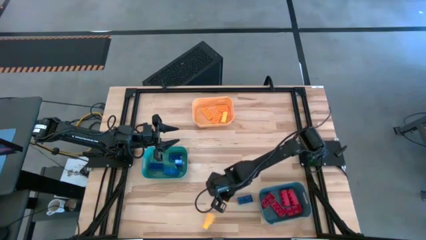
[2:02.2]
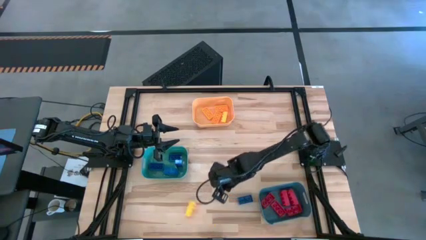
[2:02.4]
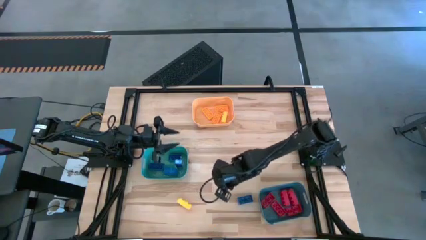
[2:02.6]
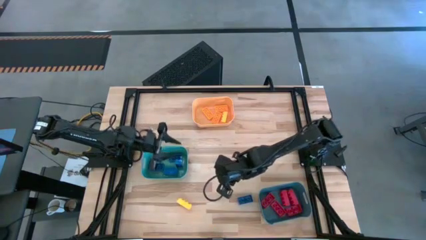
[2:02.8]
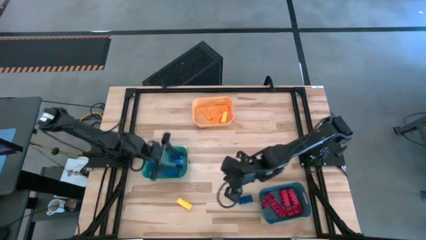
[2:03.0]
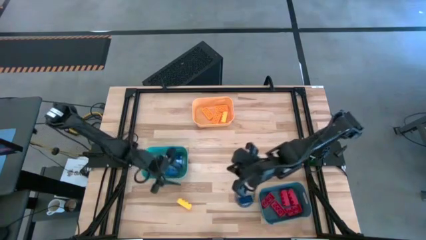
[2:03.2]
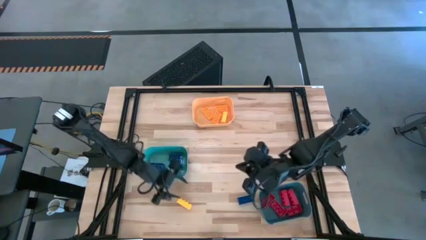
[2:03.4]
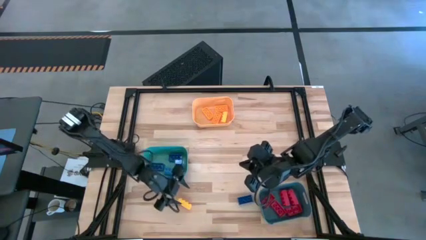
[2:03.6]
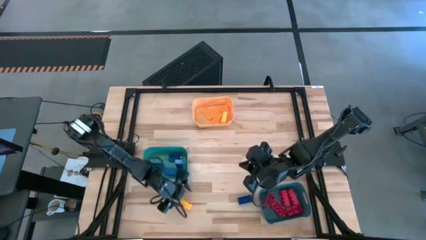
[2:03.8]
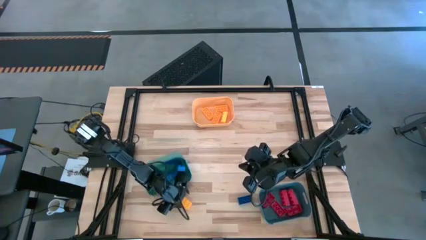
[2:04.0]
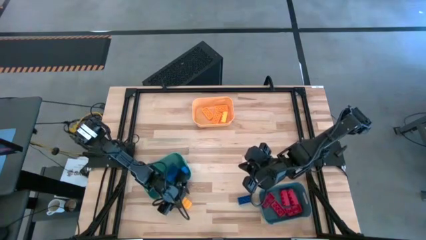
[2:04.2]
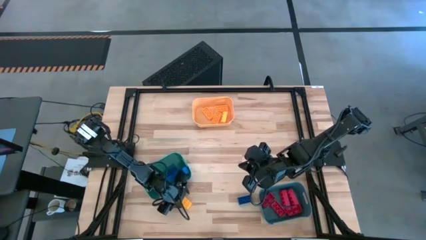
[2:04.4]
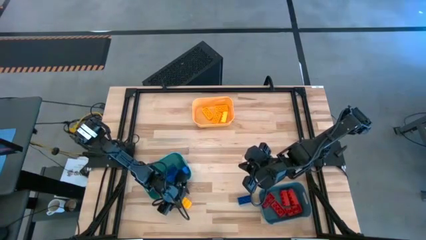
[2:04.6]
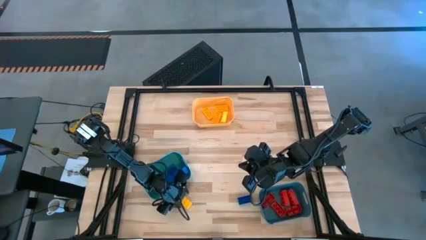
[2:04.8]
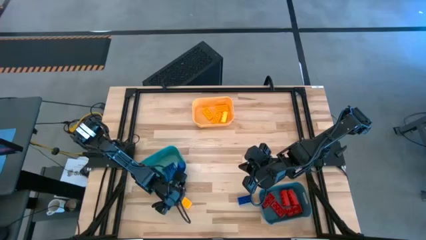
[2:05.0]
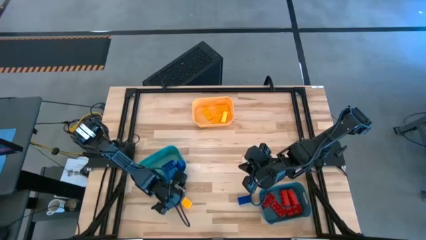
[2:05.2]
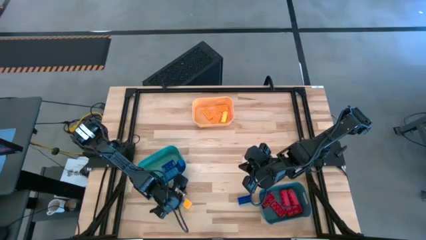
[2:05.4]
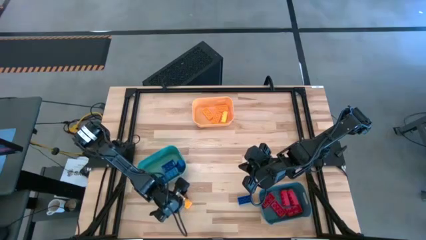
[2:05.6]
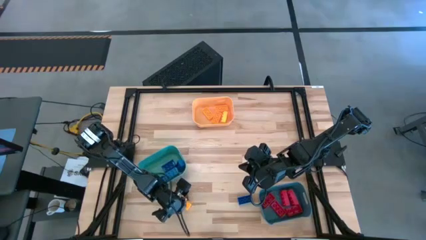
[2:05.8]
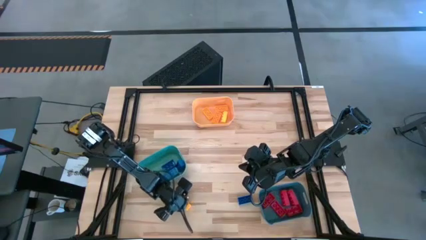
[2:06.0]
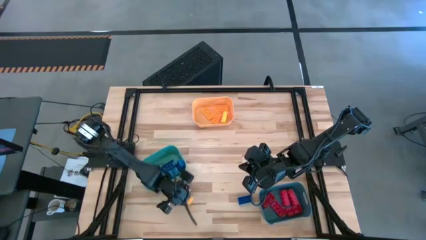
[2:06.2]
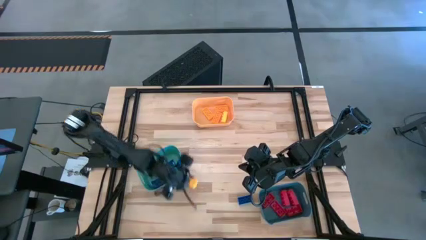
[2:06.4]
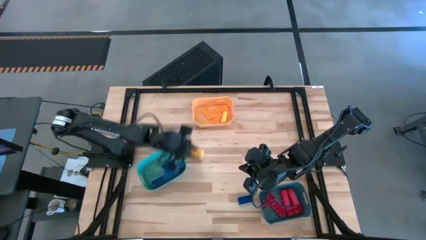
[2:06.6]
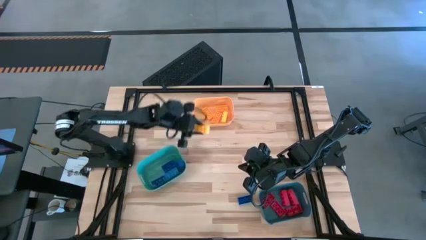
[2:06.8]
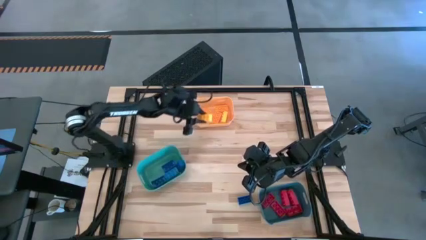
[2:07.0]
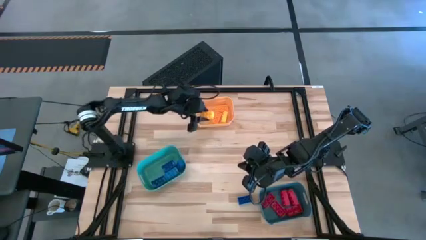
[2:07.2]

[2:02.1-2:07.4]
Task: Sort & place blocks by color
Put the yellow game piece into the orange bin

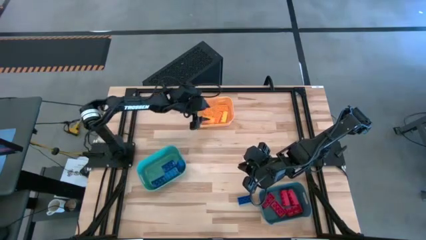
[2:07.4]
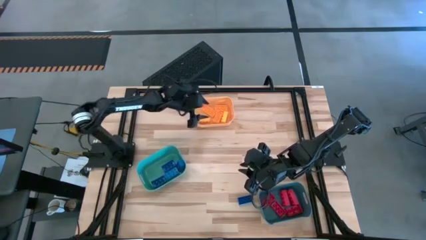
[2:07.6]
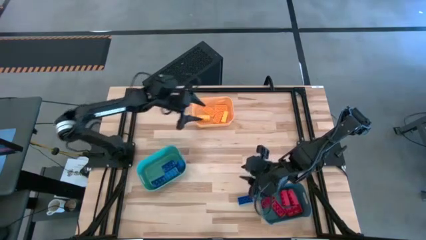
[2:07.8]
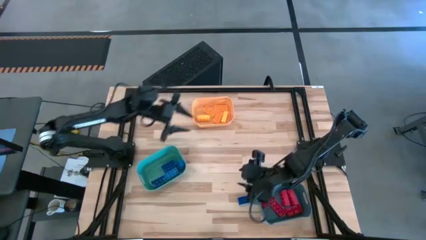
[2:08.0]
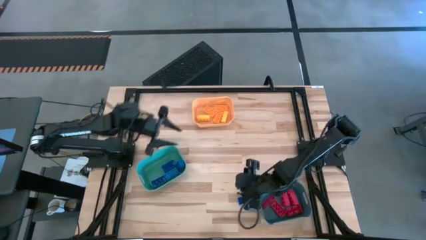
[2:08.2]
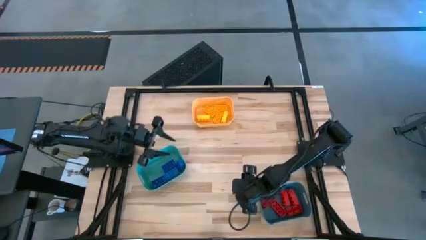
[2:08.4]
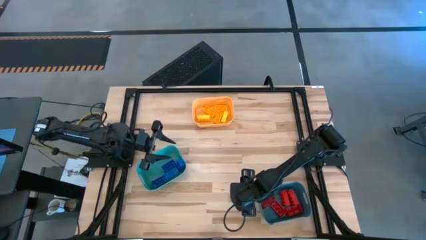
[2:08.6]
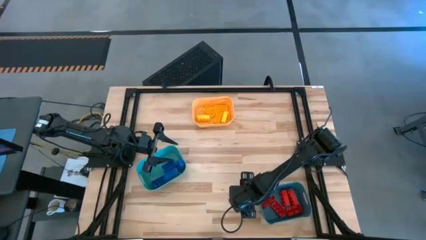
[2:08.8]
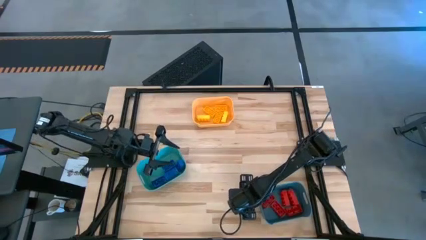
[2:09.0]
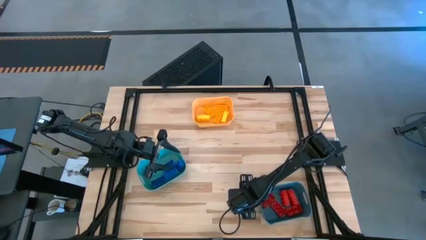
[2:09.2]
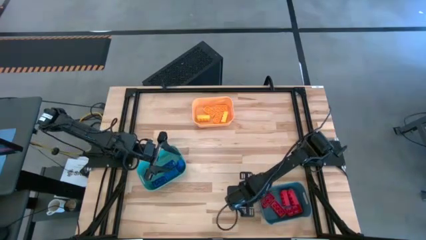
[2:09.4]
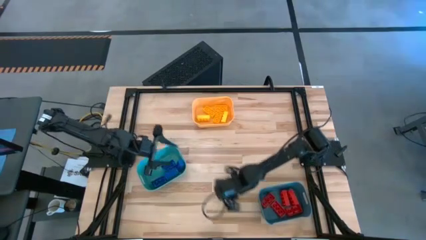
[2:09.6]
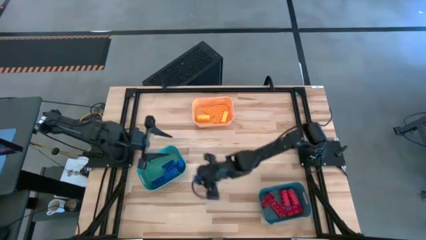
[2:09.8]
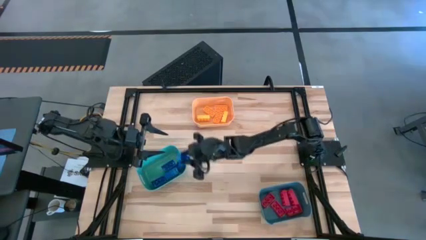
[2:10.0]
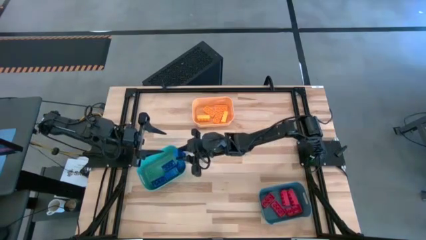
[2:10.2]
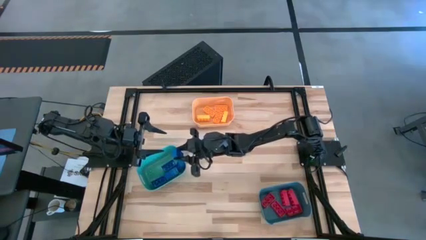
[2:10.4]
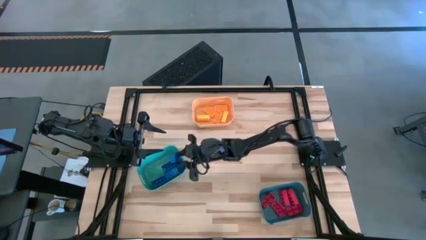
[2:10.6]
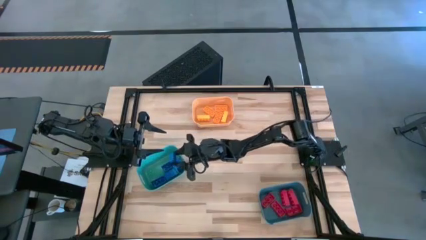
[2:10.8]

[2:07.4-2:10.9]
Put the blue game piece into the green bin

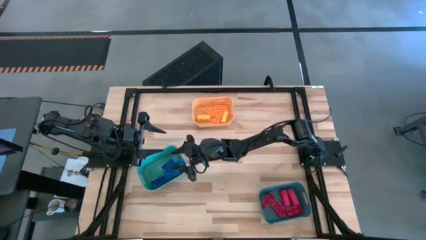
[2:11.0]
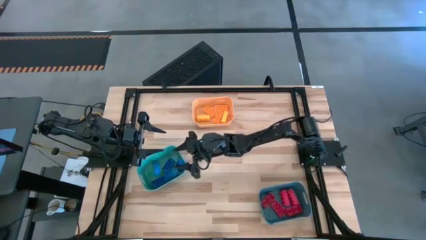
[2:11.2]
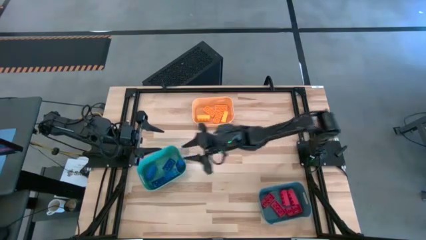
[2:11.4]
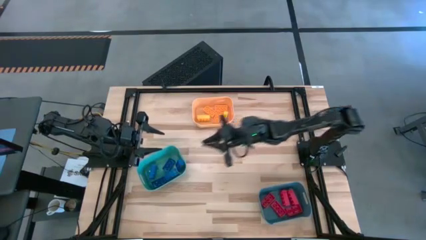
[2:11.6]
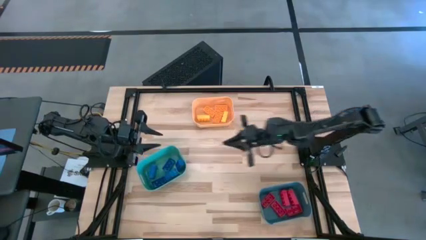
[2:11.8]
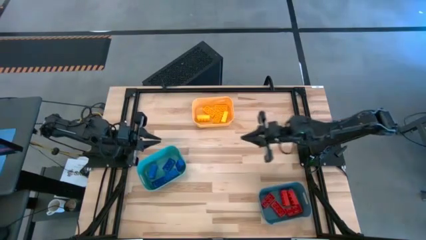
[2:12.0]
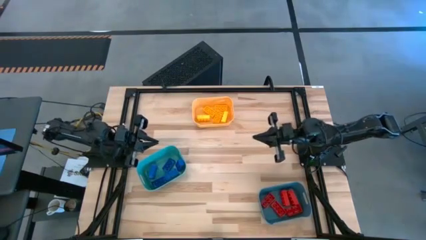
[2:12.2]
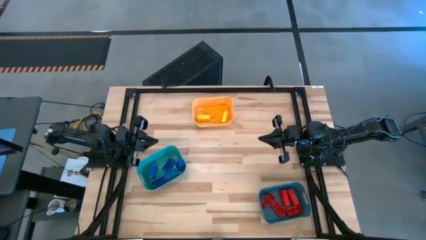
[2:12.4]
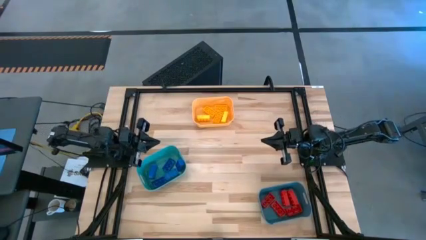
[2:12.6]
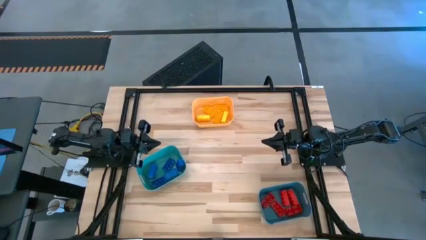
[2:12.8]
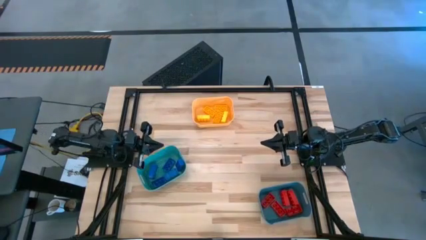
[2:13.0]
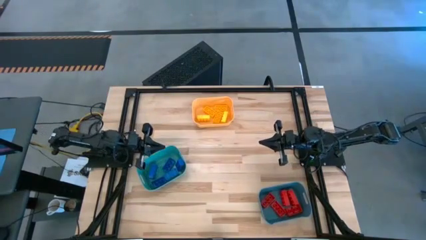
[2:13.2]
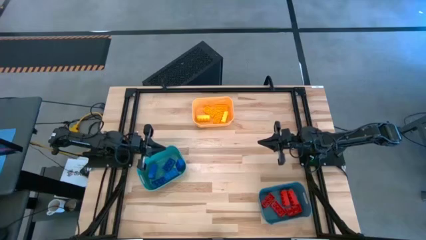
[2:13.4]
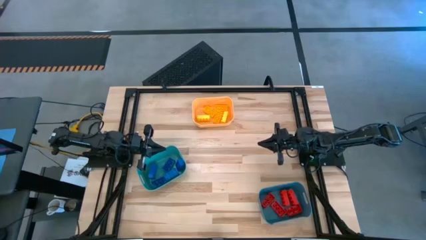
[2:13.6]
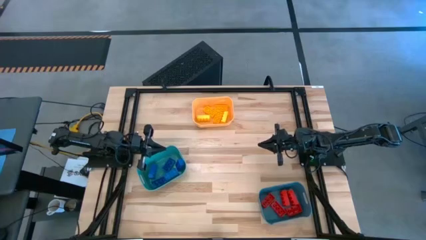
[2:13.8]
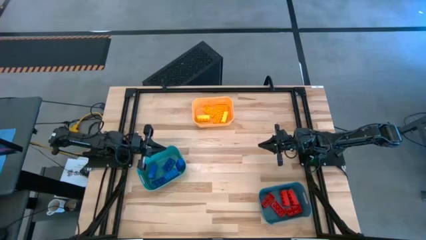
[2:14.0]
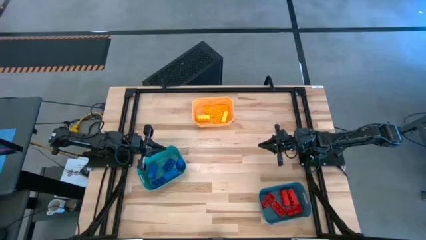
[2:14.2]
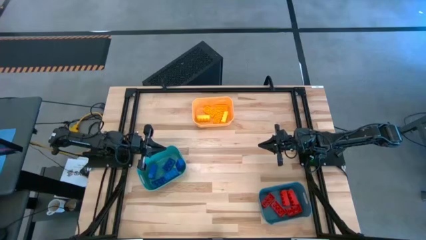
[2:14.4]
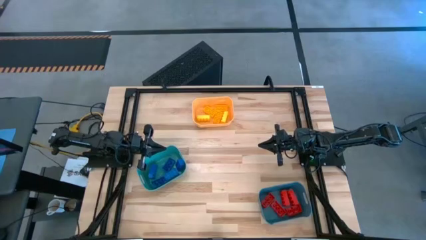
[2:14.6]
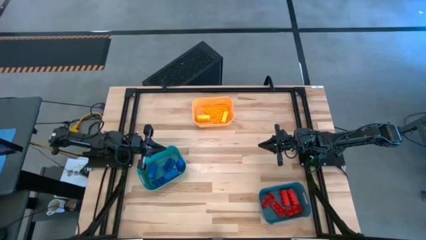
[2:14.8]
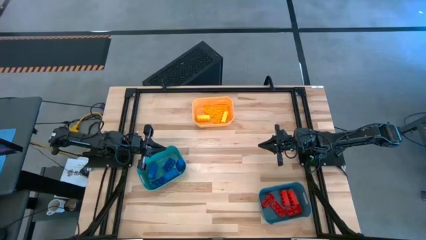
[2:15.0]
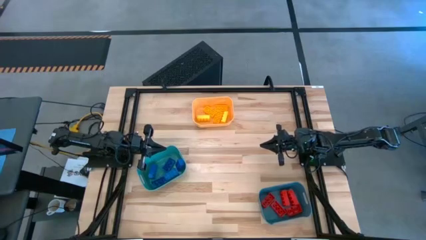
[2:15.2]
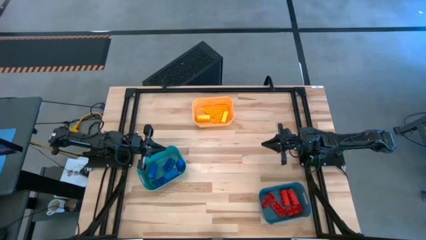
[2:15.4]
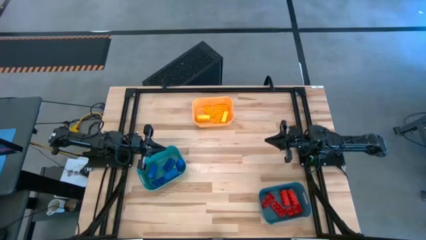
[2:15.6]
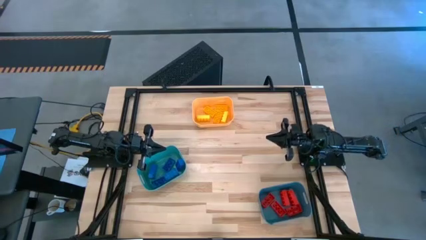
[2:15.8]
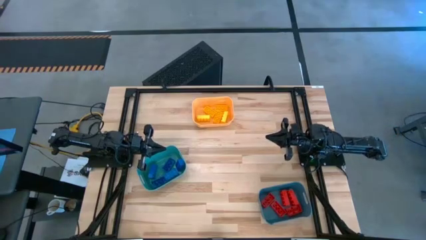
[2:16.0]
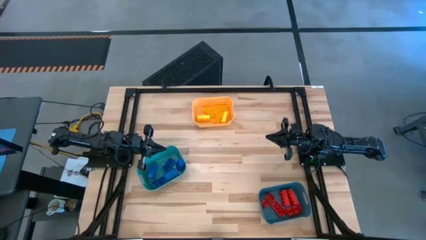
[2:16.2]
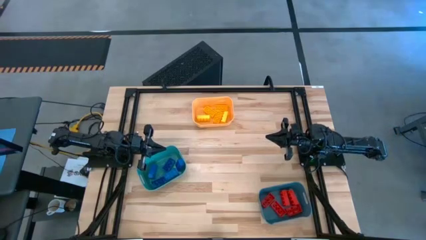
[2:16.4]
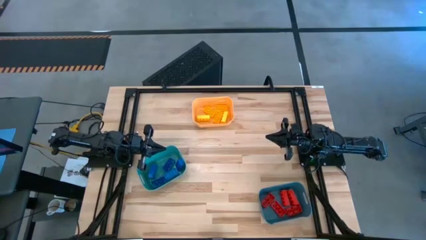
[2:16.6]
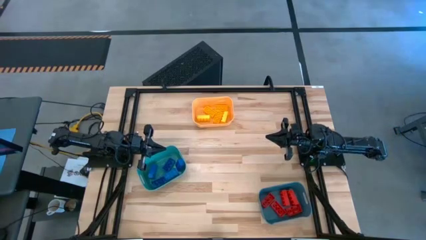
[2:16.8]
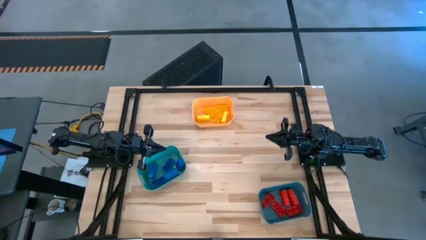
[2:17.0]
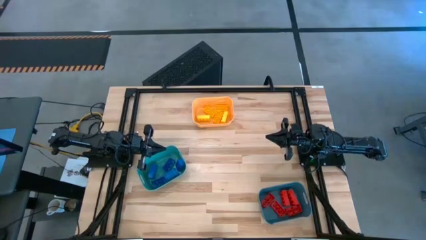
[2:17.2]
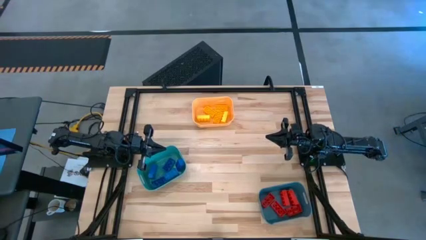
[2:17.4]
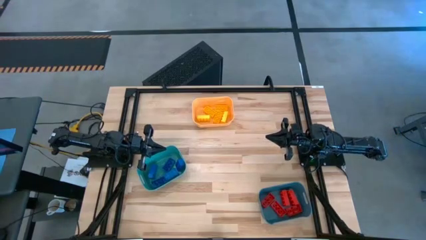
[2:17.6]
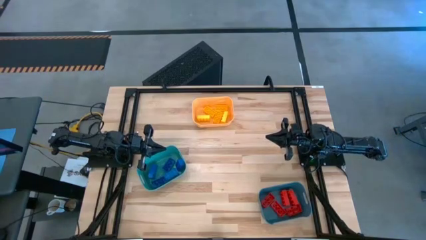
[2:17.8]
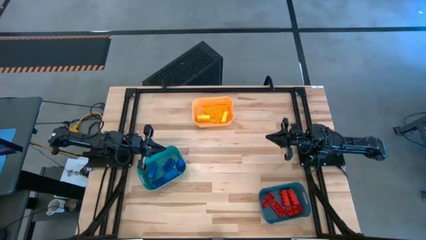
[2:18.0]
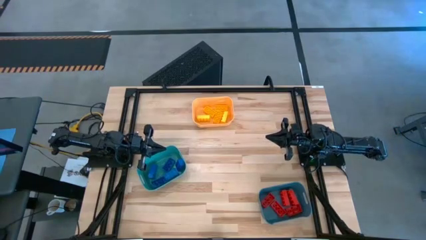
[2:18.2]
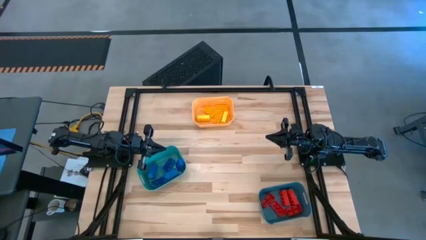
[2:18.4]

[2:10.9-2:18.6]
Return to Home Position
